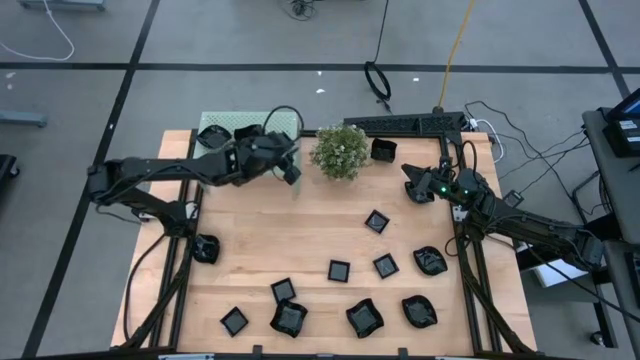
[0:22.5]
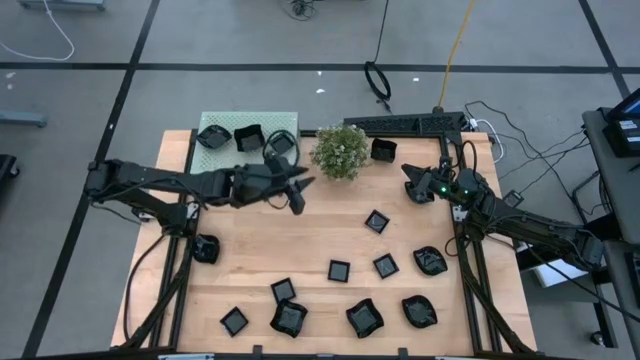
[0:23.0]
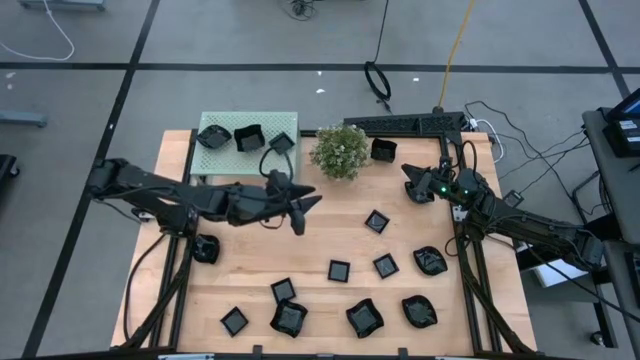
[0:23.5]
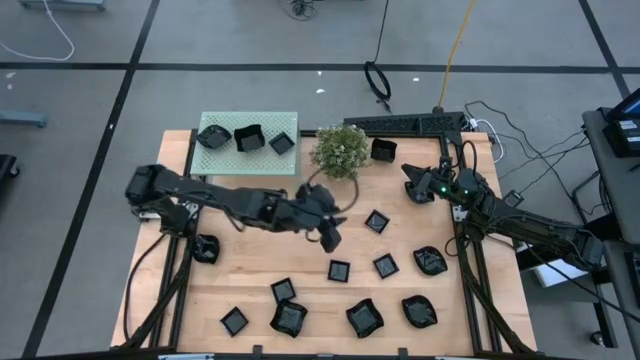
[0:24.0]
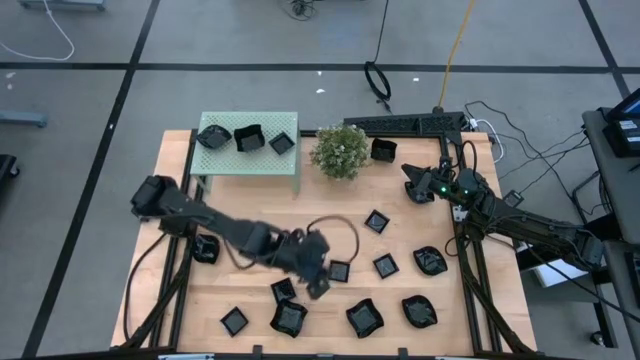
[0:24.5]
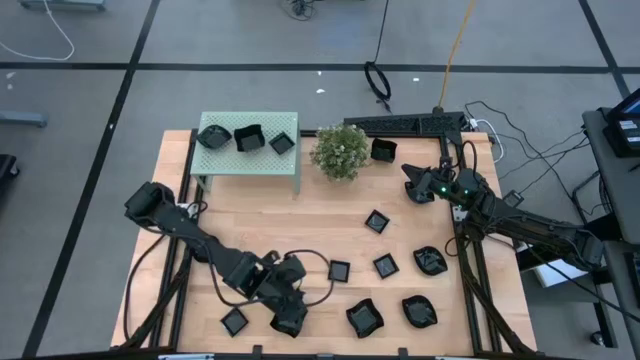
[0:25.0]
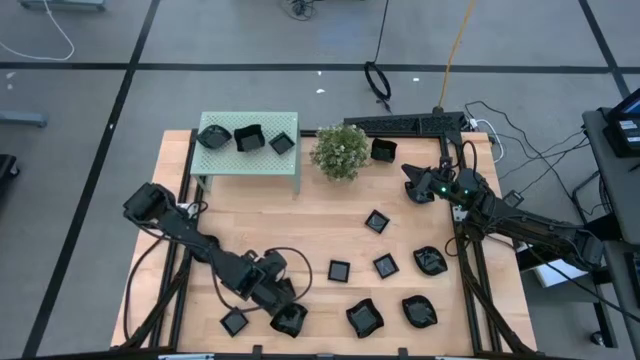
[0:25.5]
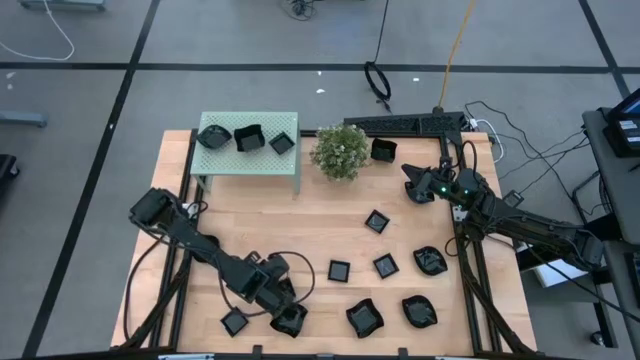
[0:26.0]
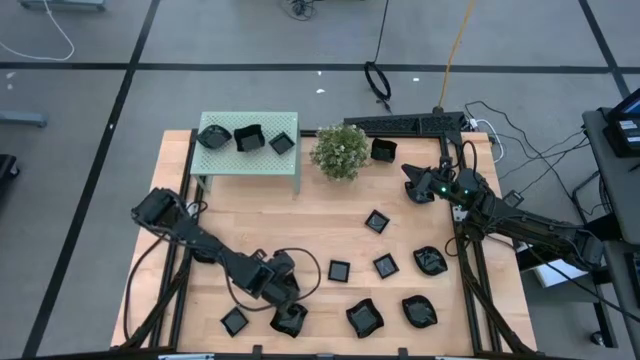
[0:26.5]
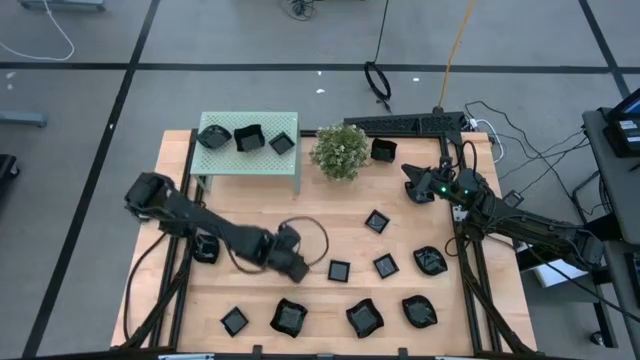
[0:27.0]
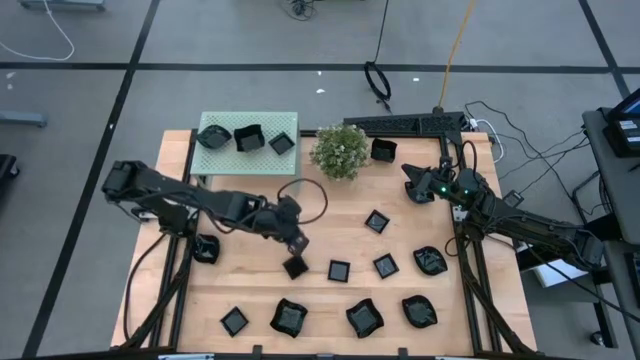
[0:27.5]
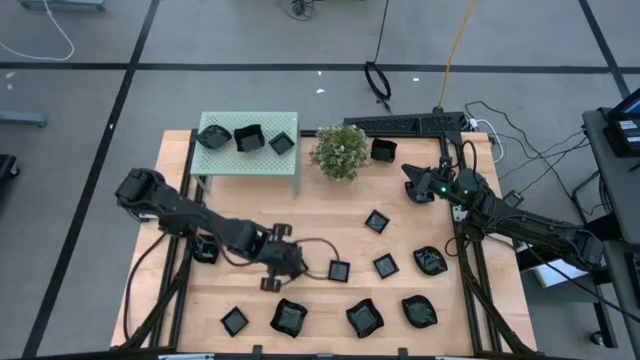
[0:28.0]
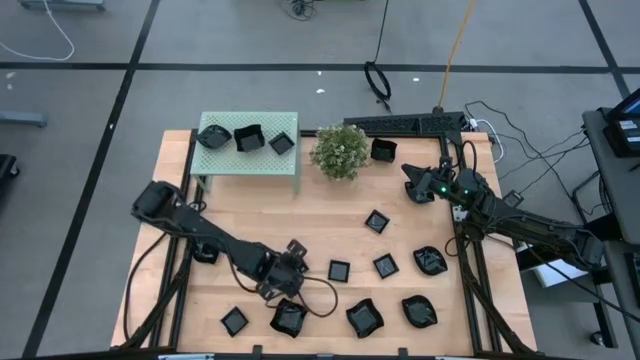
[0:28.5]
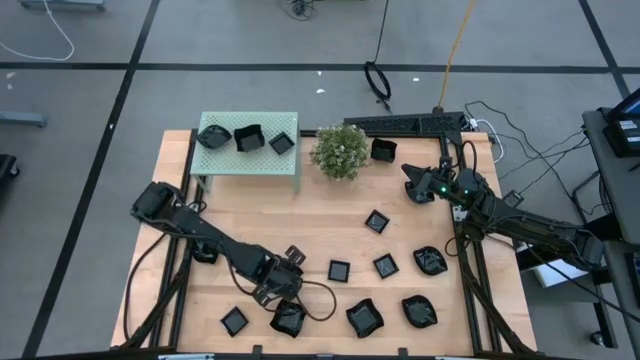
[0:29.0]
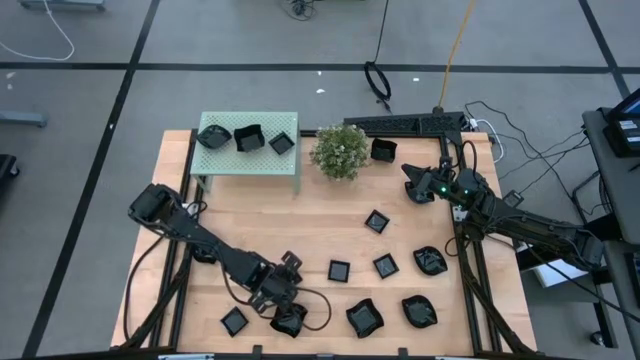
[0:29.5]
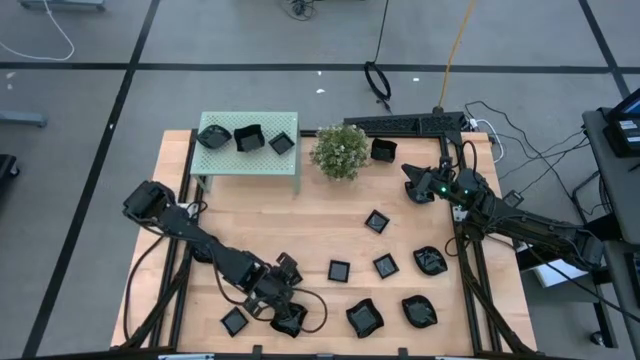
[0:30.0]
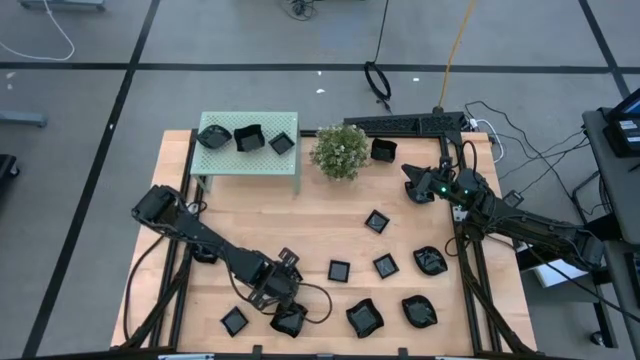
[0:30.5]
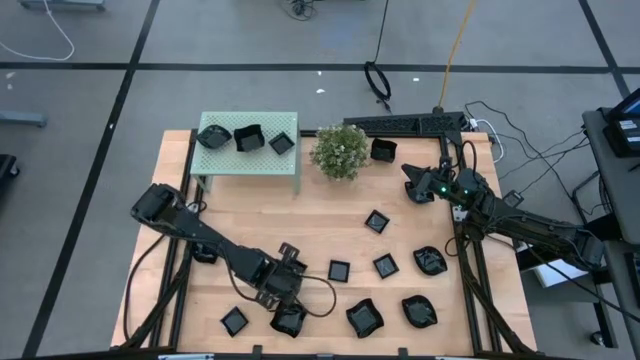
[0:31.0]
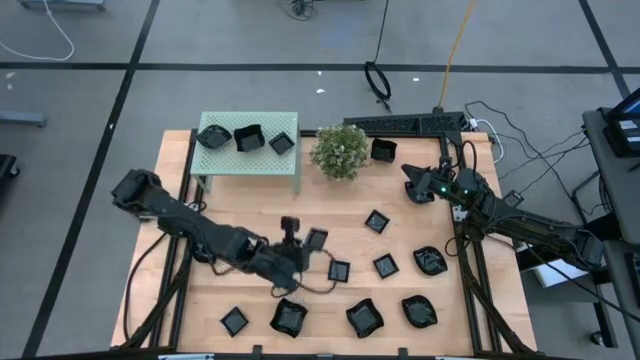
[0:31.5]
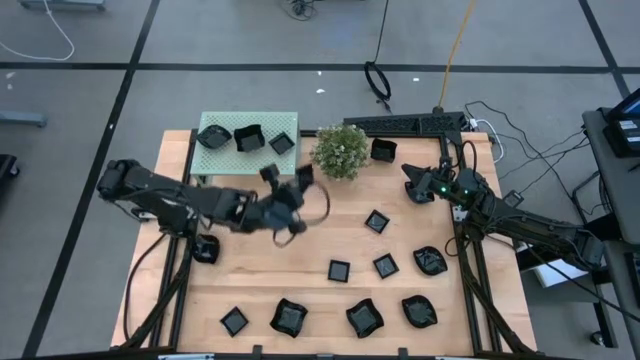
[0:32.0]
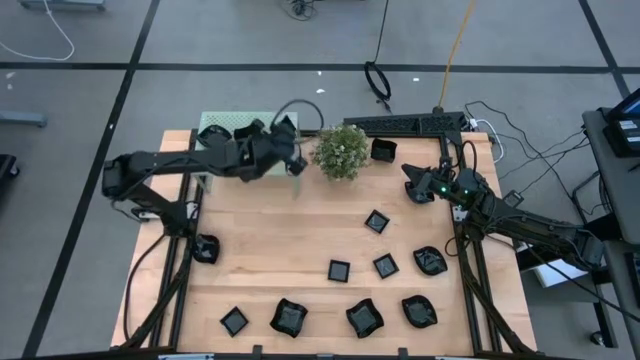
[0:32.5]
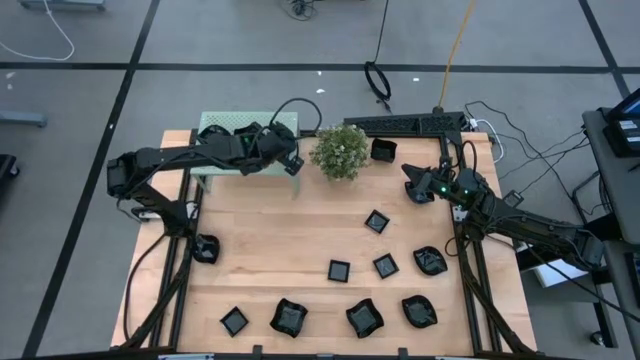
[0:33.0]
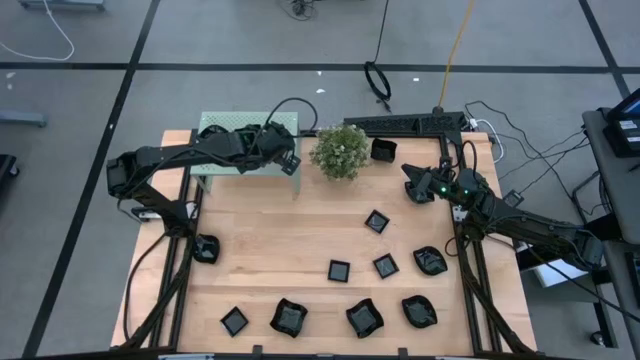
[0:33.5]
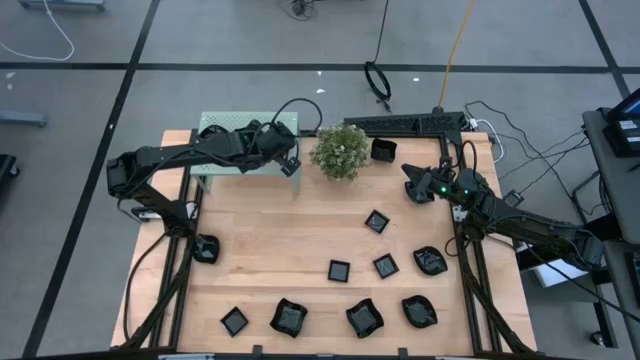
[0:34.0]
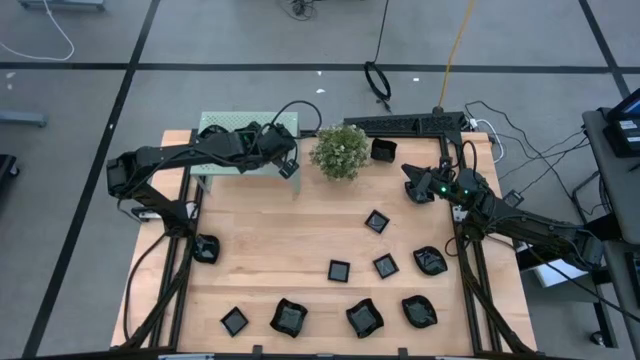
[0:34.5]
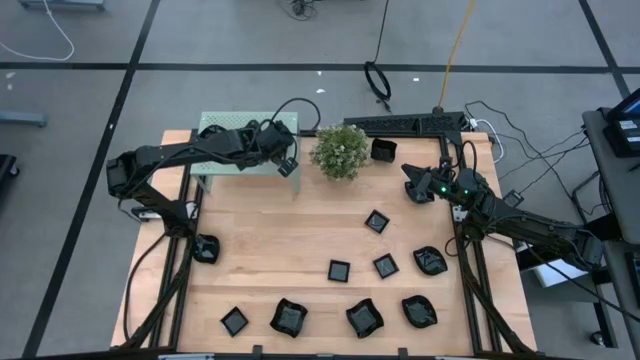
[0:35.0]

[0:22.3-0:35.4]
Task: Pick & Place Mini shaped plates
Stack the square plate on top of the square plate on the shelf

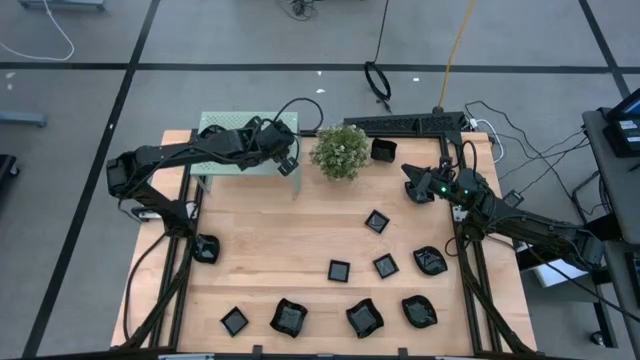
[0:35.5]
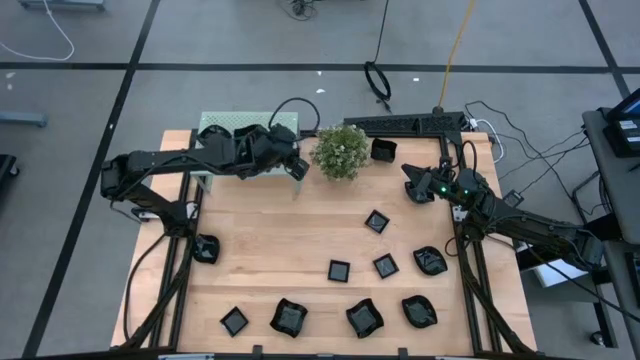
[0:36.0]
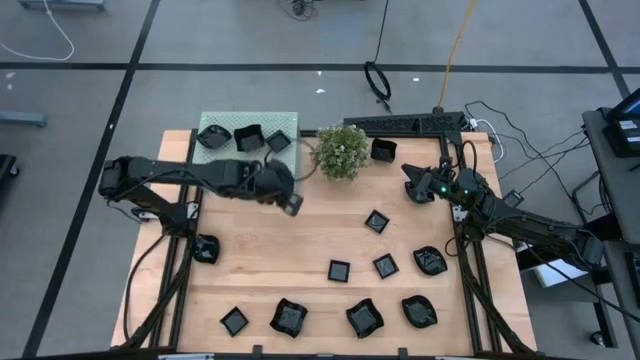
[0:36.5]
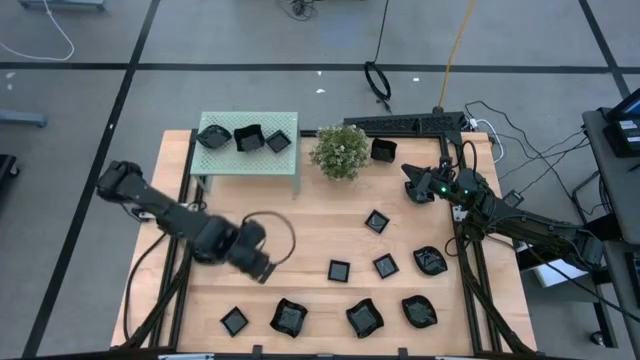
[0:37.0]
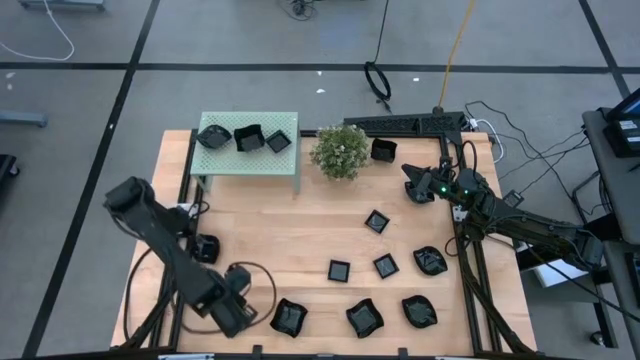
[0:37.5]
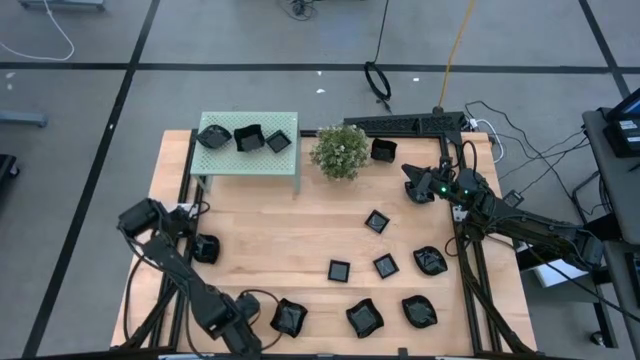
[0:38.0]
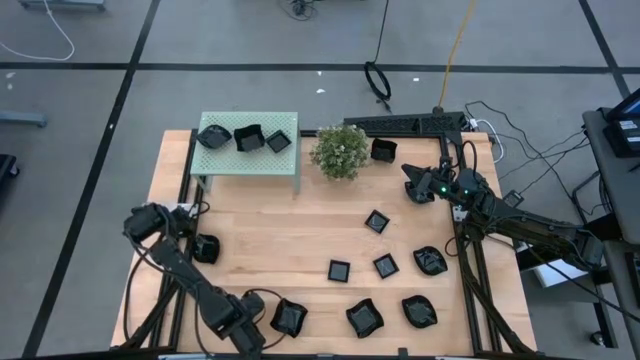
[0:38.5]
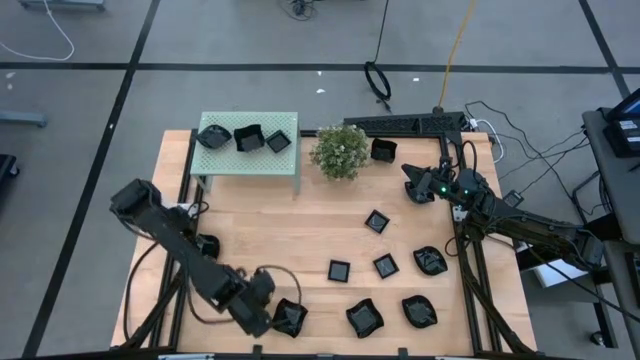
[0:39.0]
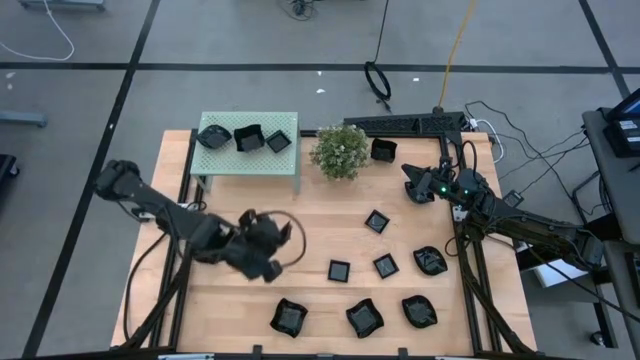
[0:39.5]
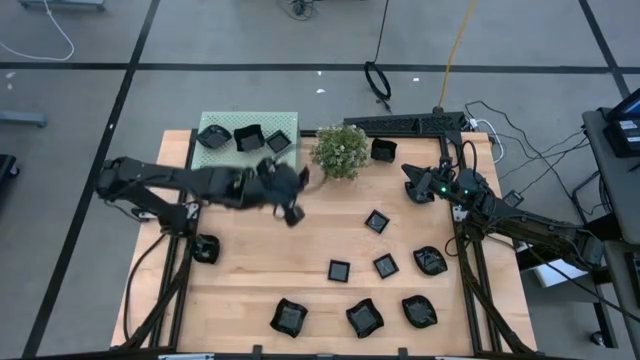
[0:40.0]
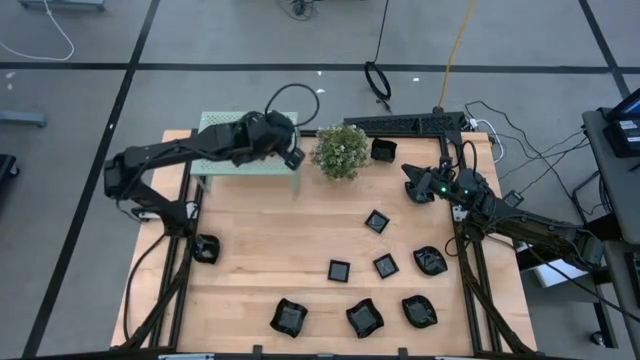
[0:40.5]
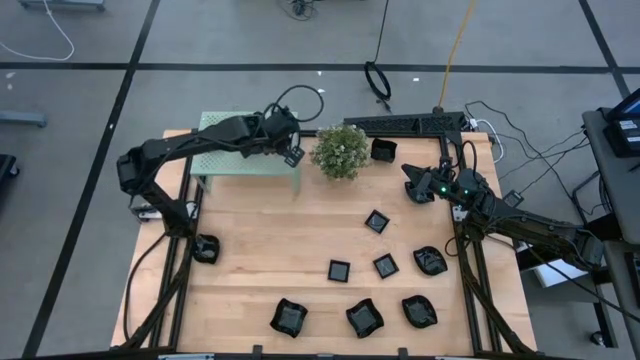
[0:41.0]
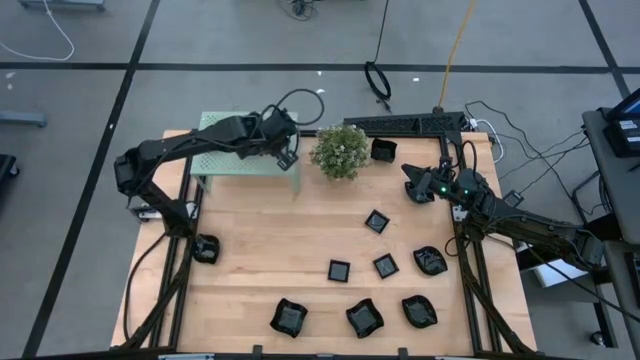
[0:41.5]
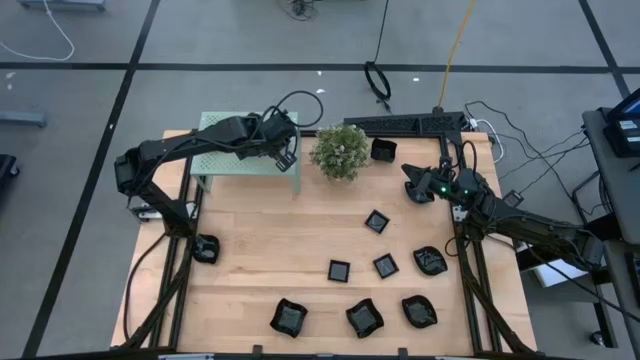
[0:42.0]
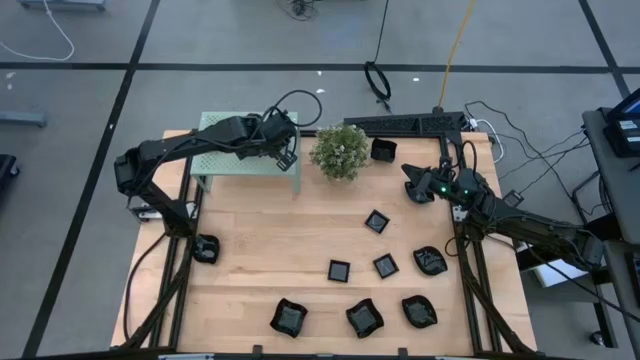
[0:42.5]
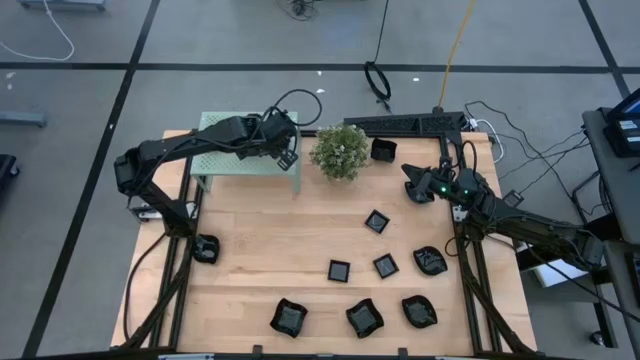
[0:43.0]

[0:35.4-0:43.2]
Stack the square plate on top of the square plate on the shelf

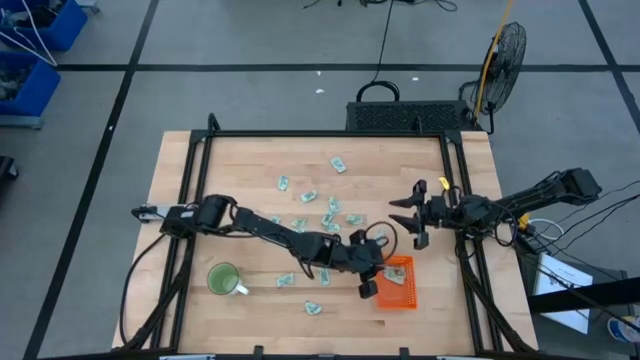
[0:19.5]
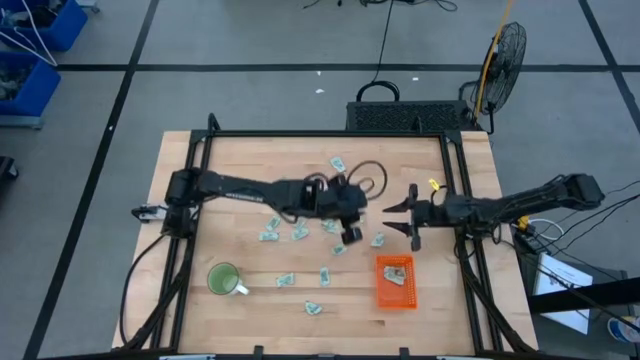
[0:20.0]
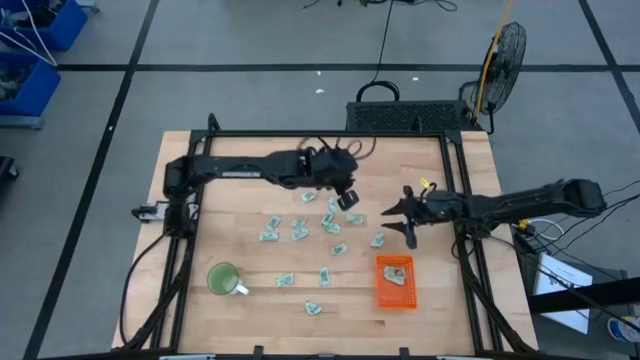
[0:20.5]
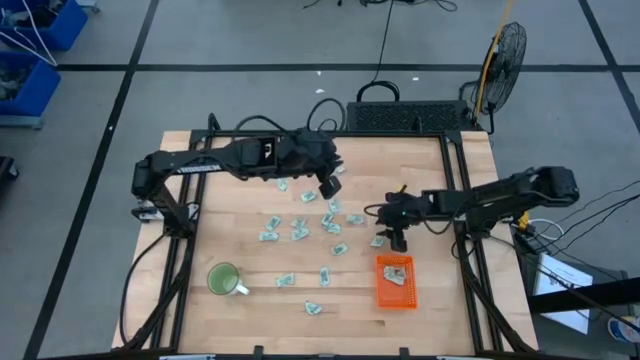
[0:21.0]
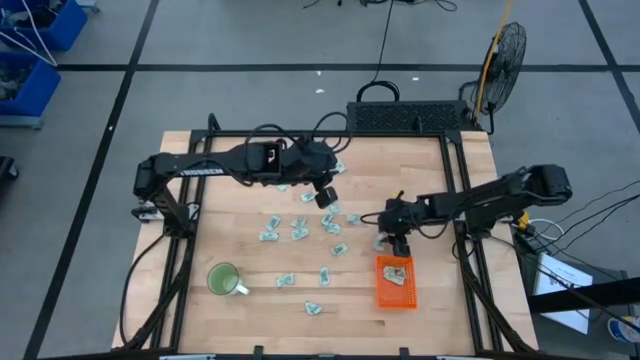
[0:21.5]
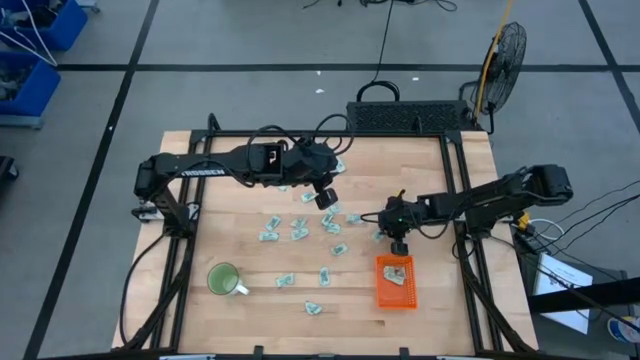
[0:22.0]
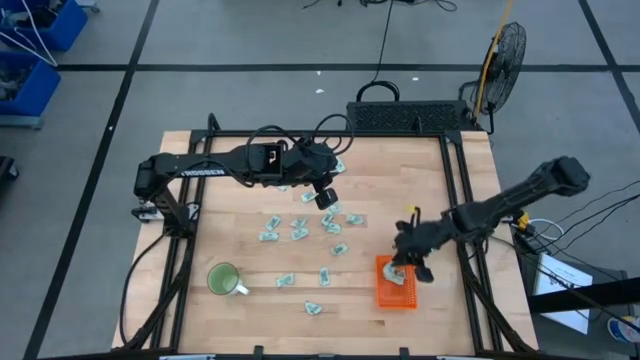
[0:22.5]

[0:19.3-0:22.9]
Task: Pick and place Stevia / Truvia into bins
Put the stevia packet into the orange basket
